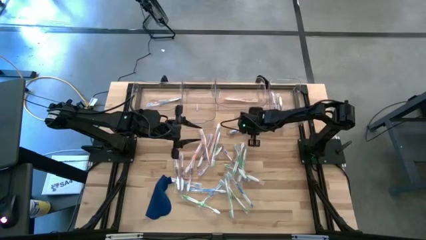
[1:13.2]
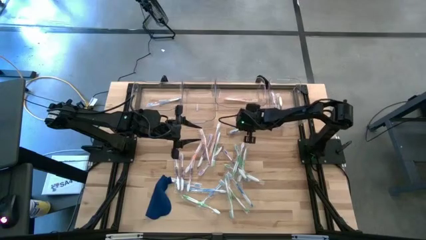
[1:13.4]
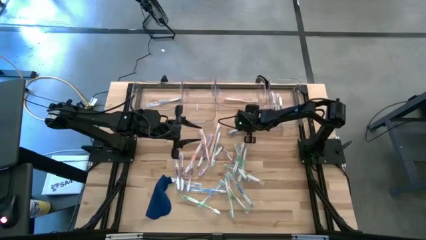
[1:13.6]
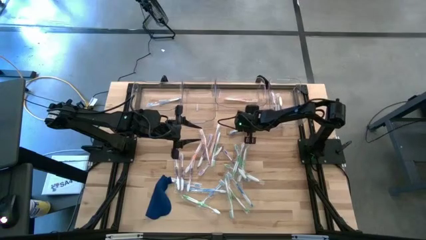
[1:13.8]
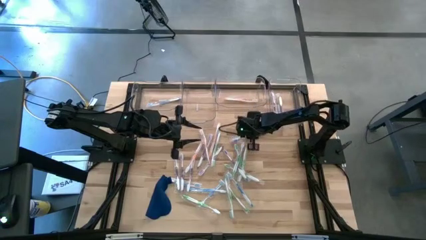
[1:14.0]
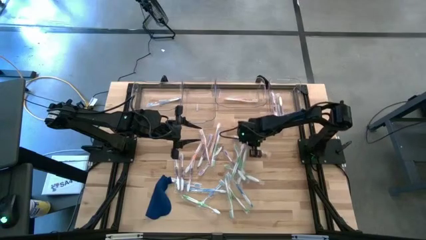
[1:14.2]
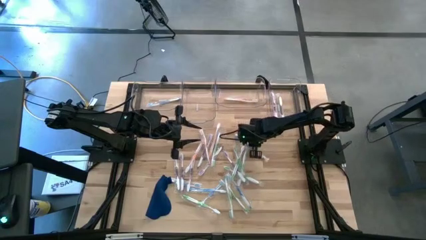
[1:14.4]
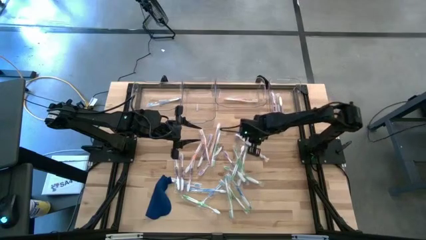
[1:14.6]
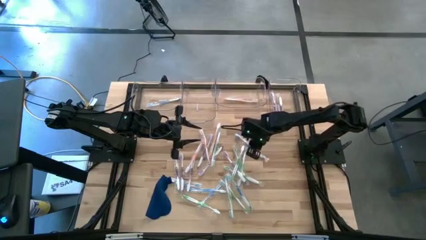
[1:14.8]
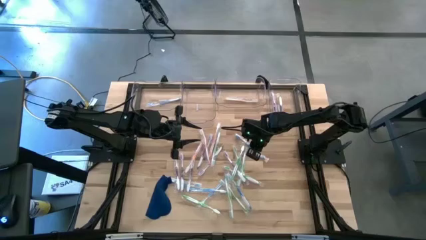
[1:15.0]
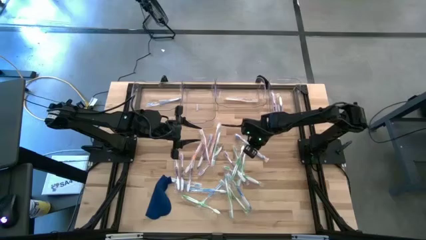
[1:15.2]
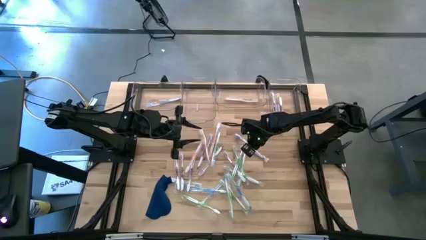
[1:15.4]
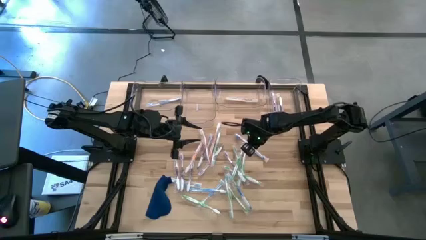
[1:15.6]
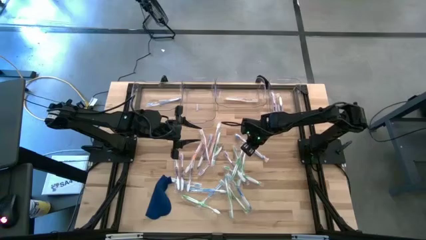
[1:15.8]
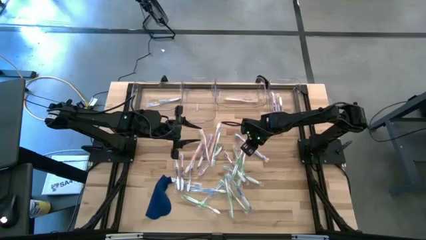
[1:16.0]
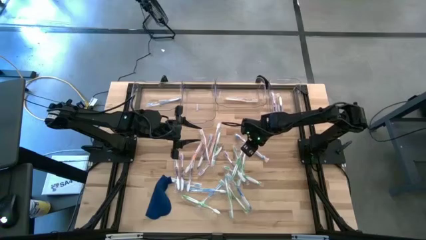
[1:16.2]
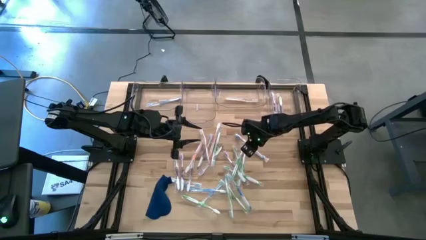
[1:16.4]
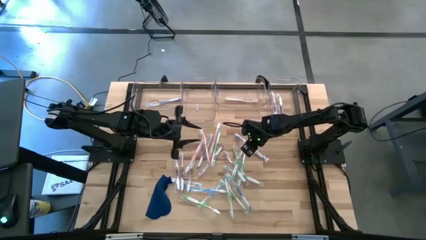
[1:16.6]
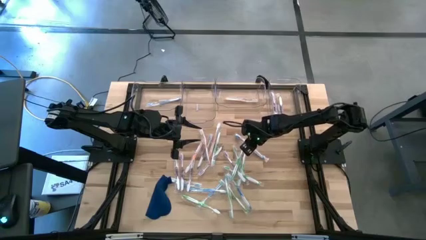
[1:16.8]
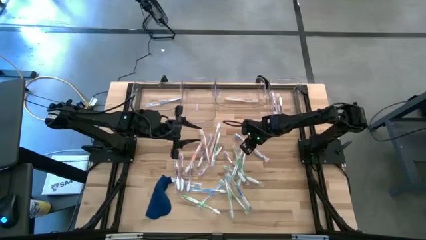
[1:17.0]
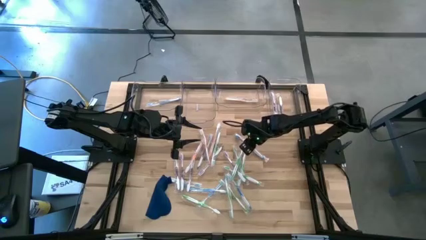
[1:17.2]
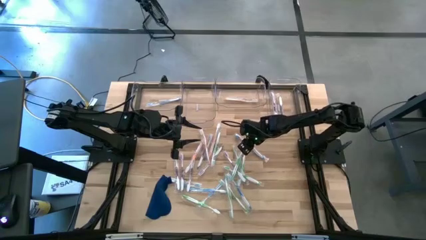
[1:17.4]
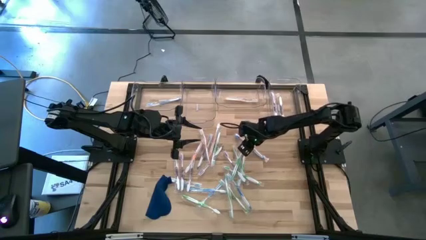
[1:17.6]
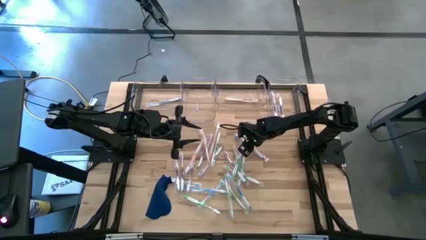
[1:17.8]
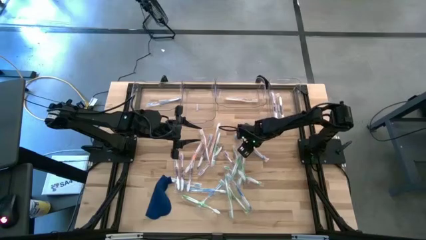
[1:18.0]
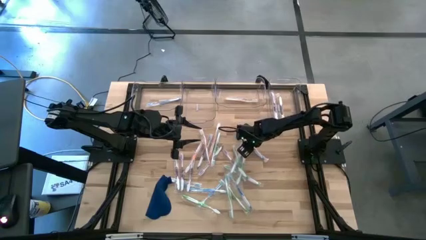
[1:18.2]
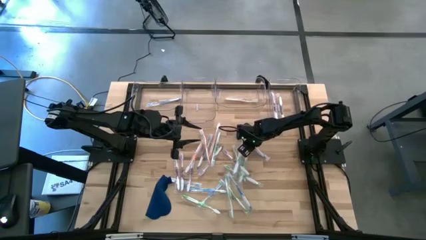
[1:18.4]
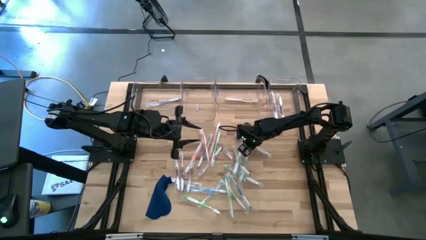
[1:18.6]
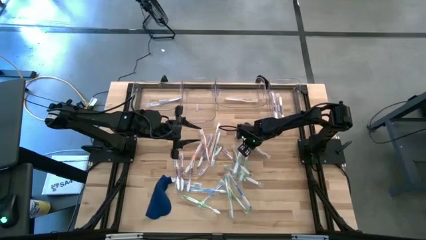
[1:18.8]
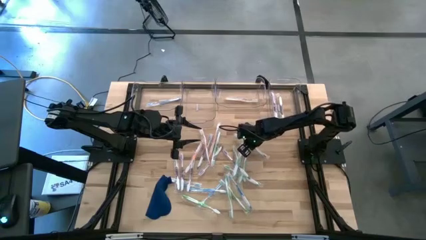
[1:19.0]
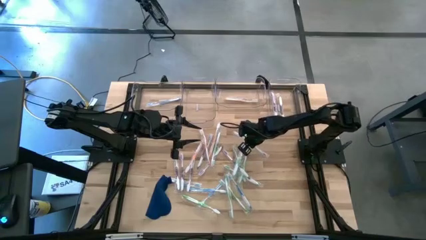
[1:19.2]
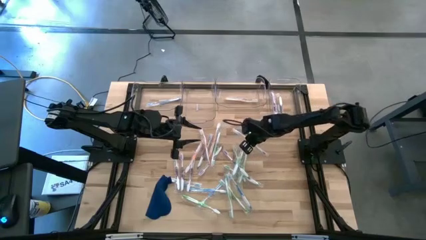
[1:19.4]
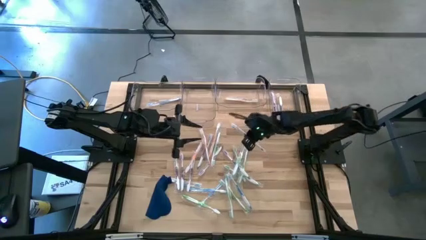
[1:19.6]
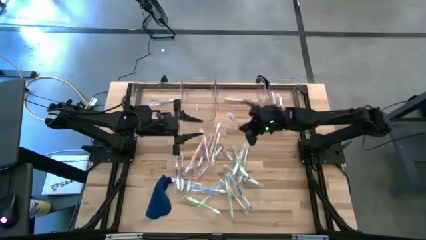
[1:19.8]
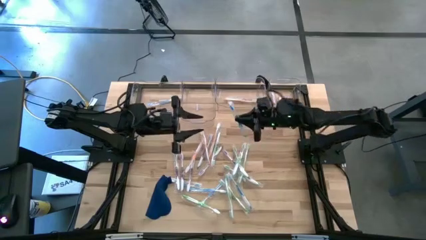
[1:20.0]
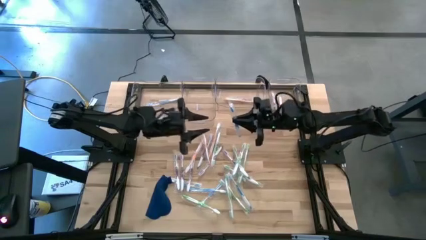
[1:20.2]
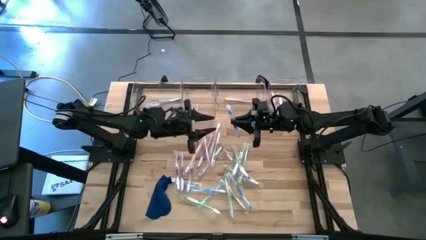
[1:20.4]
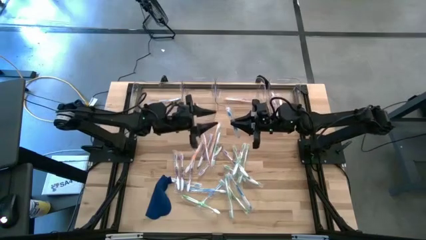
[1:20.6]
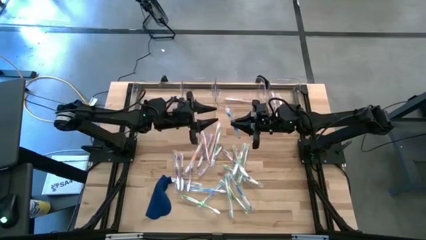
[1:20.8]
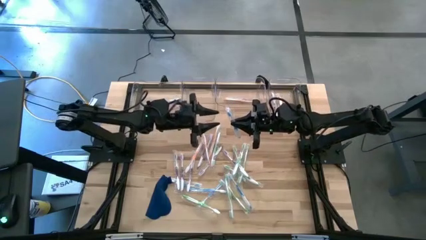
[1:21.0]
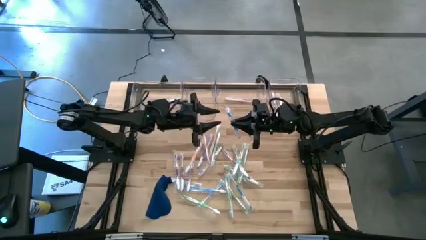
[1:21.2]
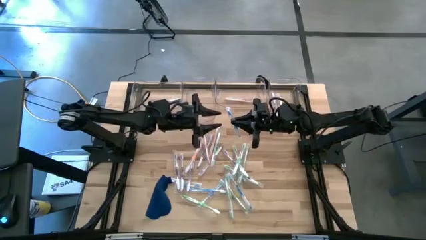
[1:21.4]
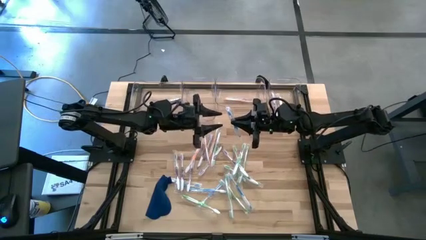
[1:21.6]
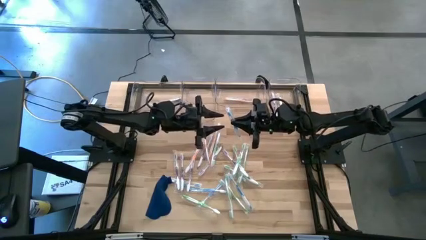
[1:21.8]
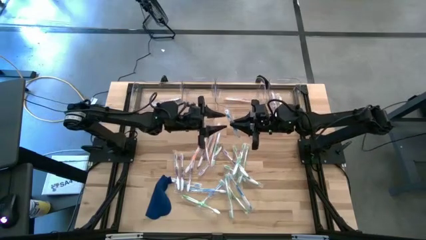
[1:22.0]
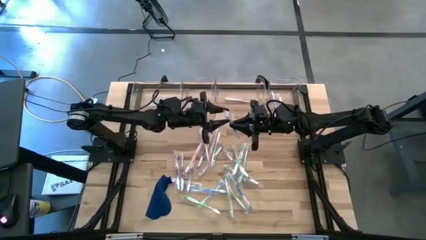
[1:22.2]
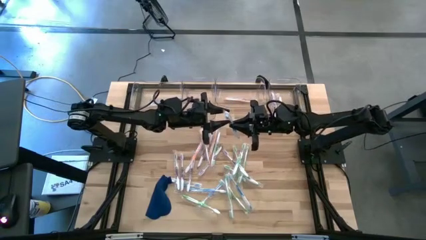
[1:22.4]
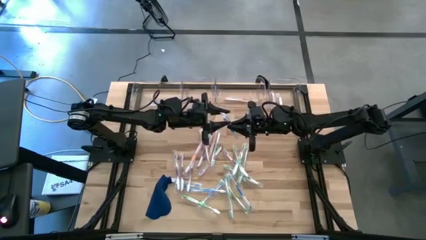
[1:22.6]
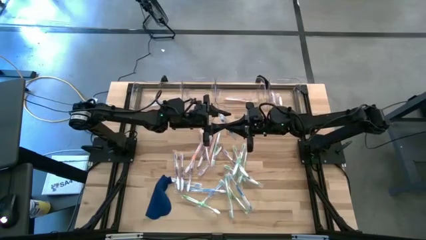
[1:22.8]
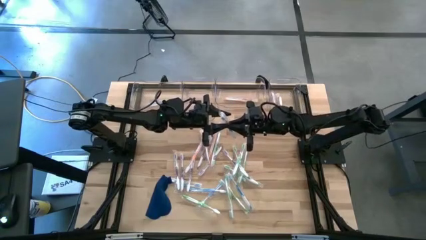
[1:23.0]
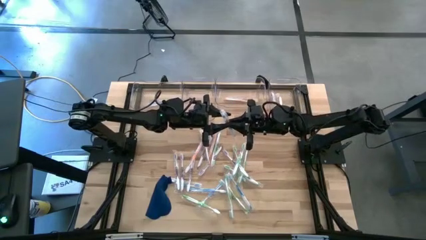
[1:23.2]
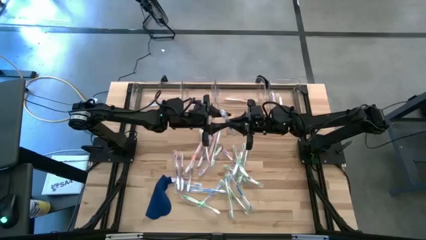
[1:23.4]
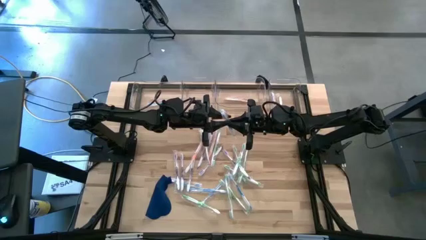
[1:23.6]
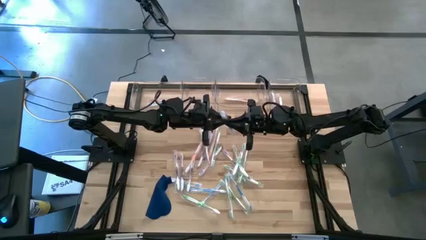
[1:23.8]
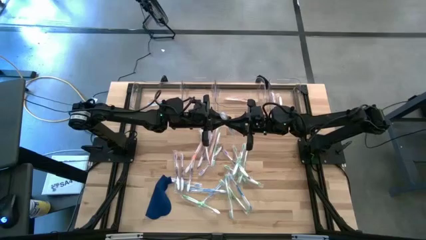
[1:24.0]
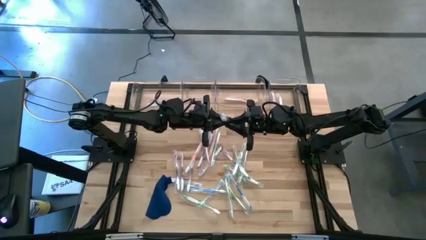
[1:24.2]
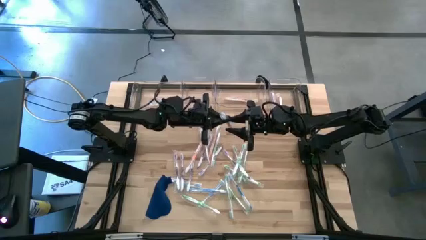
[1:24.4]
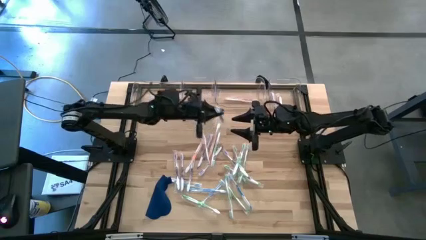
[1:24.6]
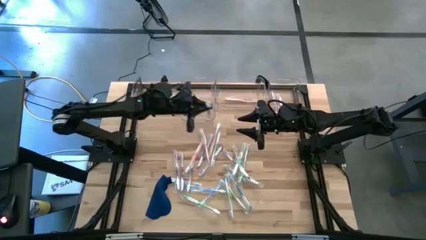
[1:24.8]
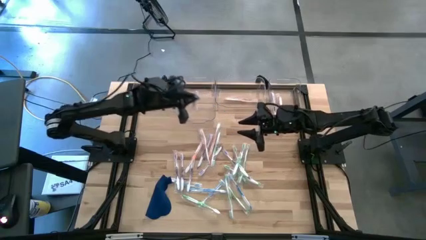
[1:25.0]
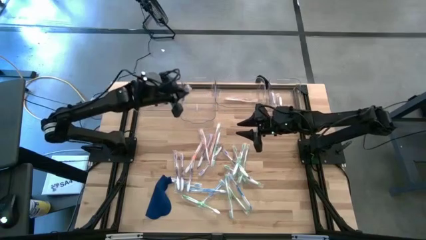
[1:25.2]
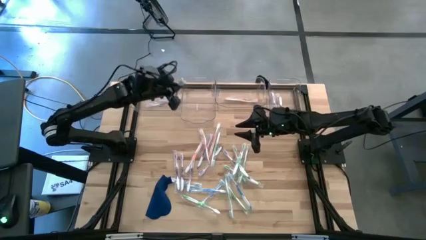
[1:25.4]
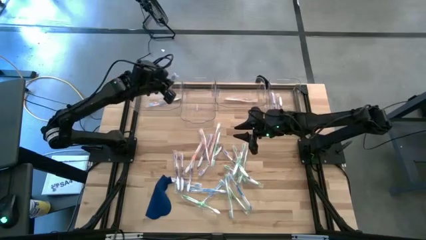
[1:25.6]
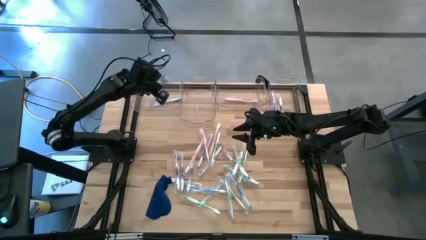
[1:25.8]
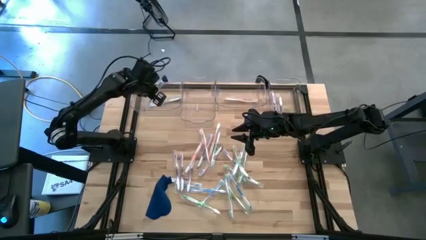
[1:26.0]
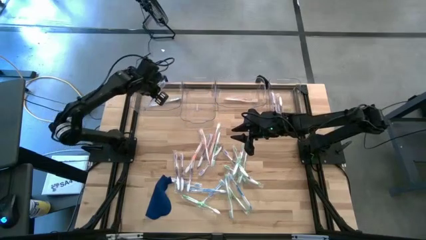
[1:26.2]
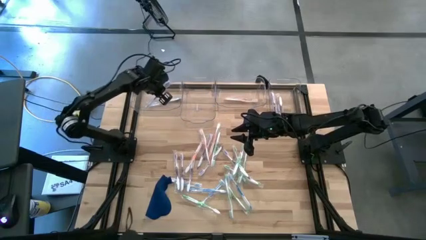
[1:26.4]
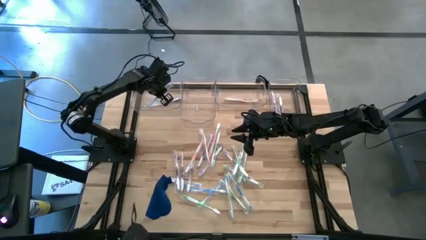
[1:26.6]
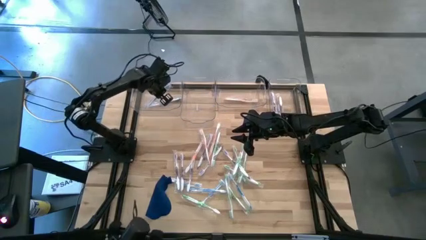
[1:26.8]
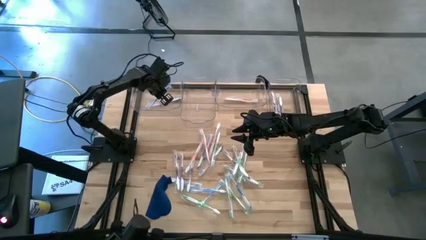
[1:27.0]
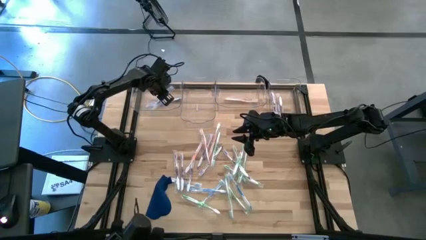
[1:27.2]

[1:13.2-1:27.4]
Task: Pick & Place Toothbrushes
Put the blue toothbrush into the left transparent bin

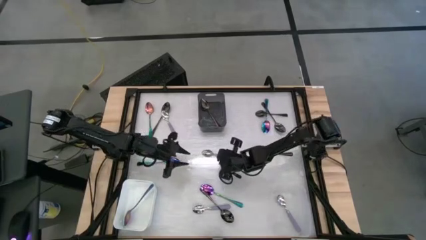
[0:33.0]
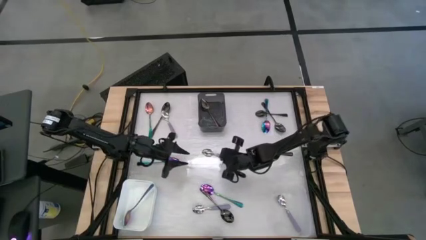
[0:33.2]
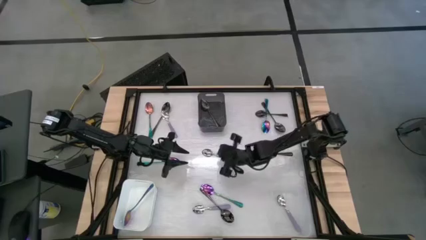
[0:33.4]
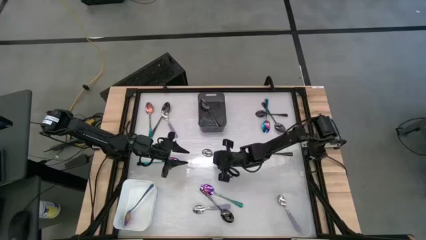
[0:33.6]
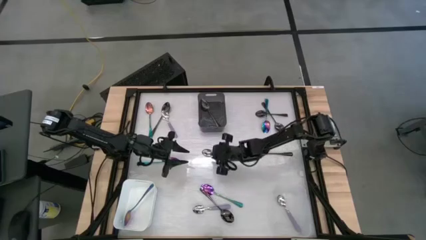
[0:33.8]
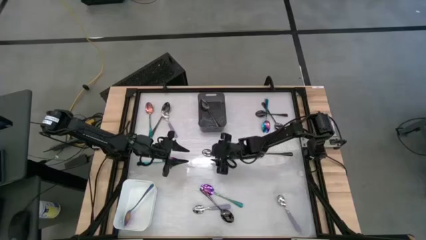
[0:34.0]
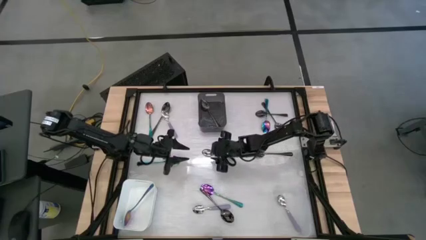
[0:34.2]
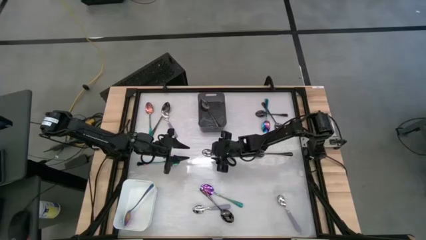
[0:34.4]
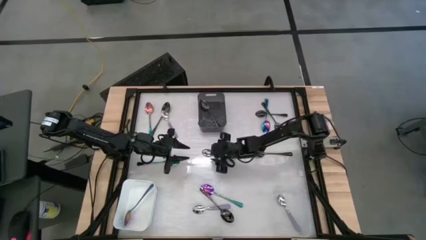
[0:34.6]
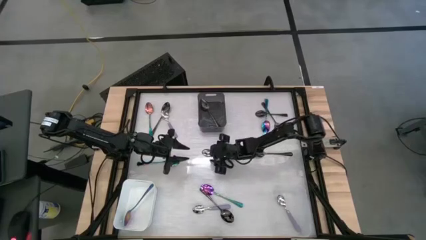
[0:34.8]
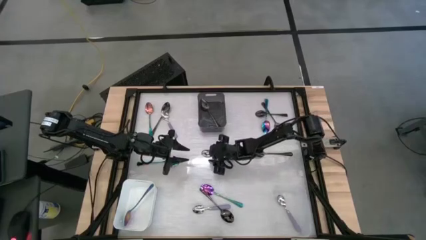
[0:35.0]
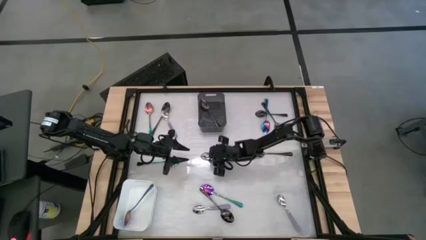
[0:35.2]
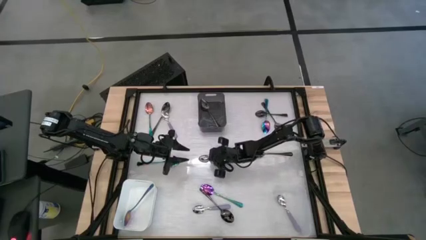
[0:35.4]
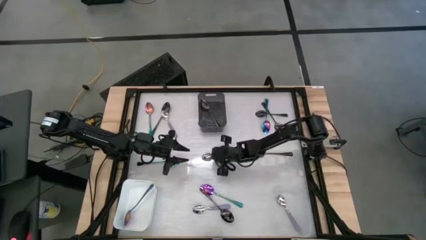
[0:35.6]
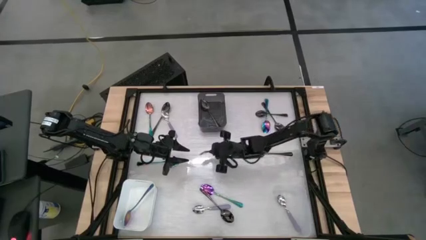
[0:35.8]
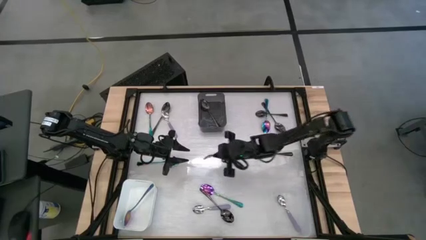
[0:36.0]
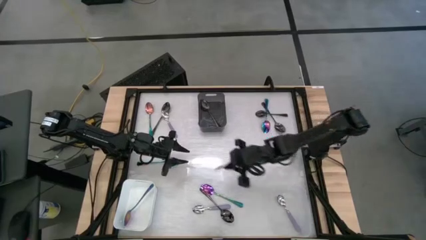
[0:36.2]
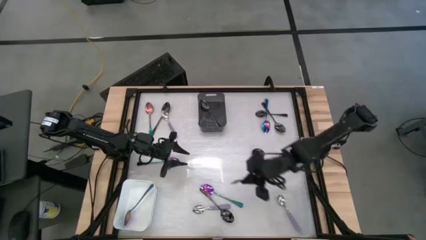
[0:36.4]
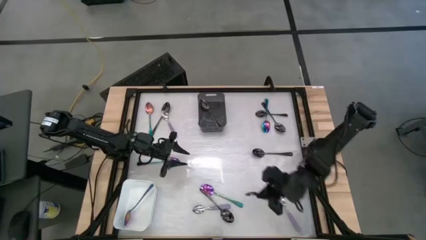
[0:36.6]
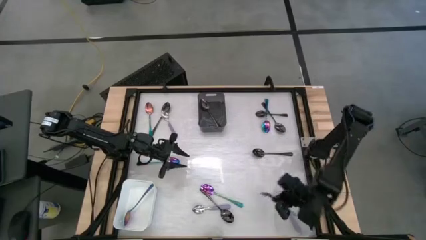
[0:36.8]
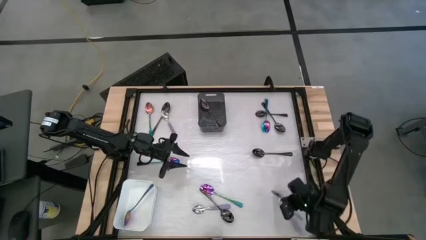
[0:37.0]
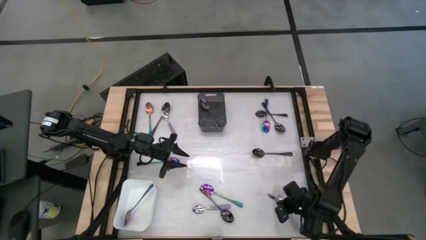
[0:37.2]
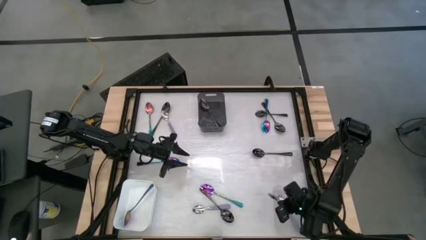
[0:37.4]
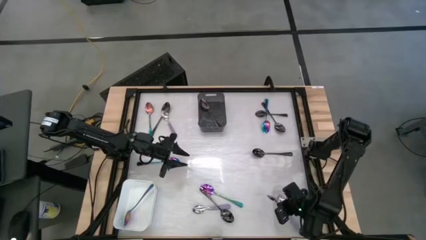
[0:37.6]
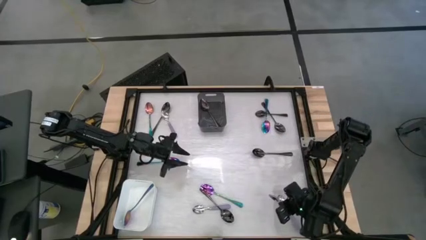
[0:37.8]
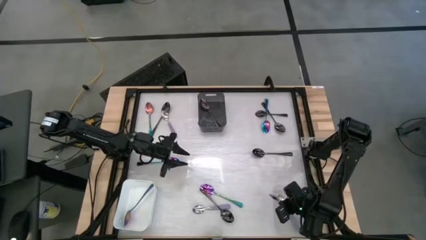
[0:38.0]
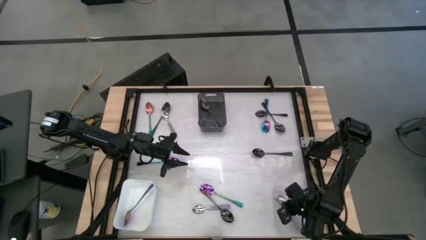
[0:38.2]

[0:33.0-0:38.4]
Task: Sort silverware by color (type)
Put the purple spoon into the transparent bin
